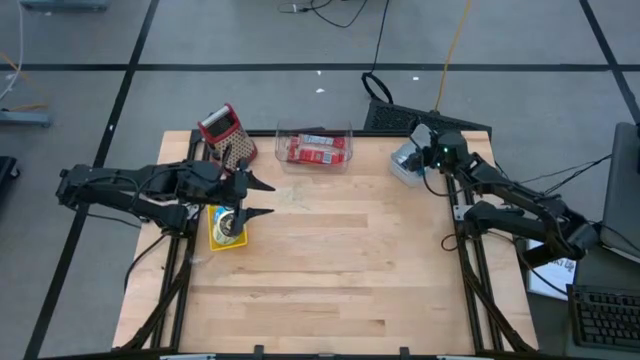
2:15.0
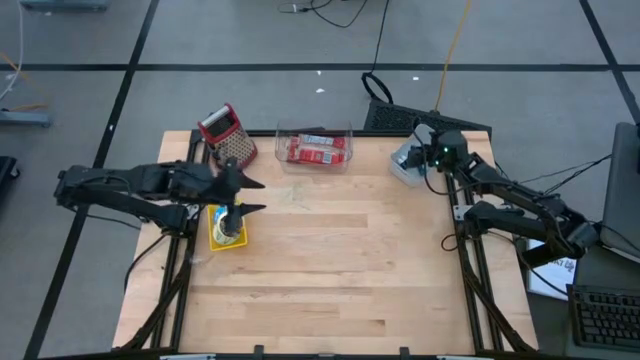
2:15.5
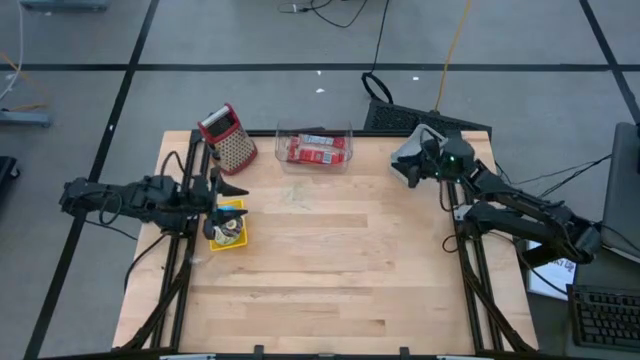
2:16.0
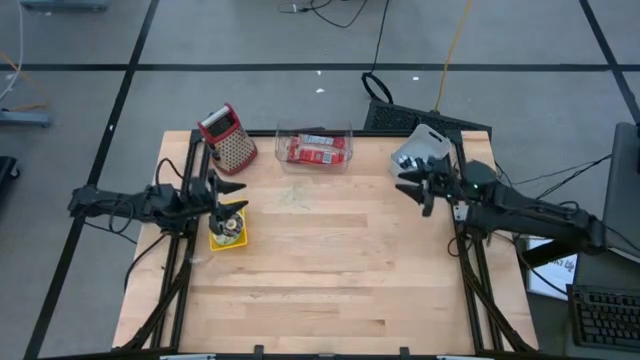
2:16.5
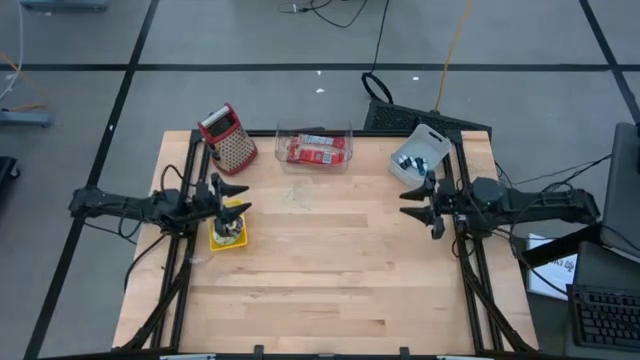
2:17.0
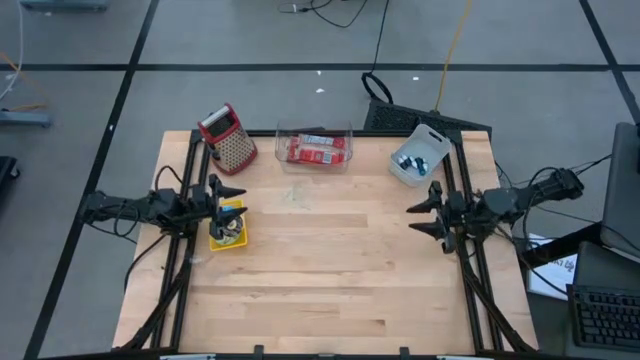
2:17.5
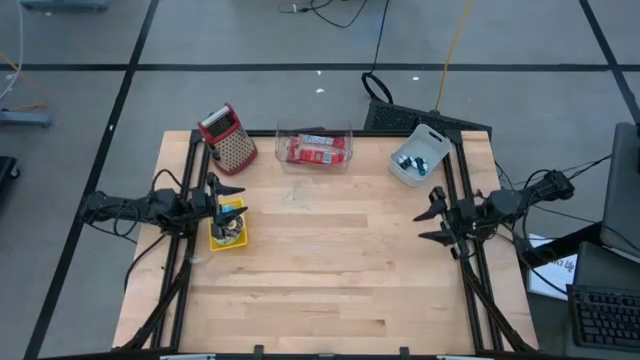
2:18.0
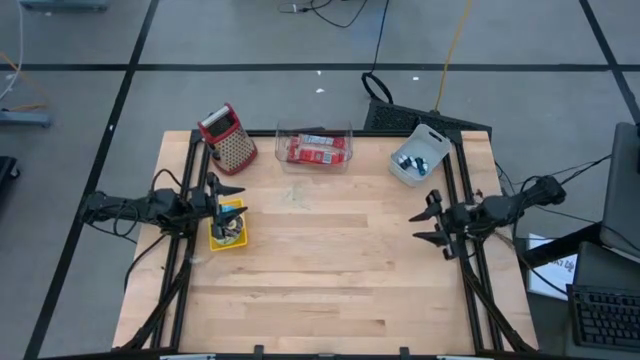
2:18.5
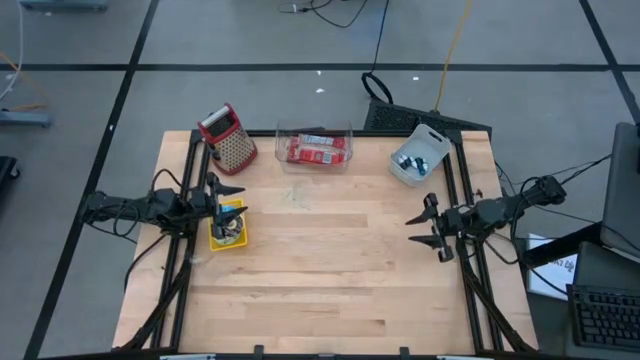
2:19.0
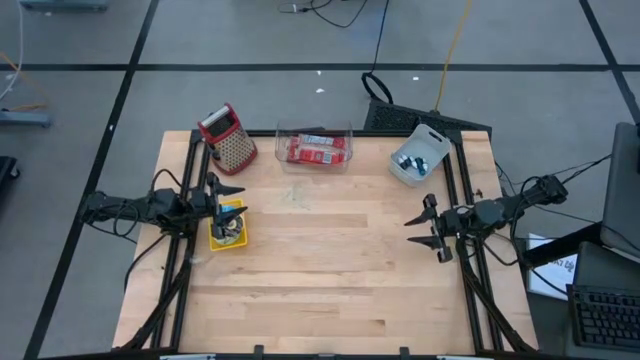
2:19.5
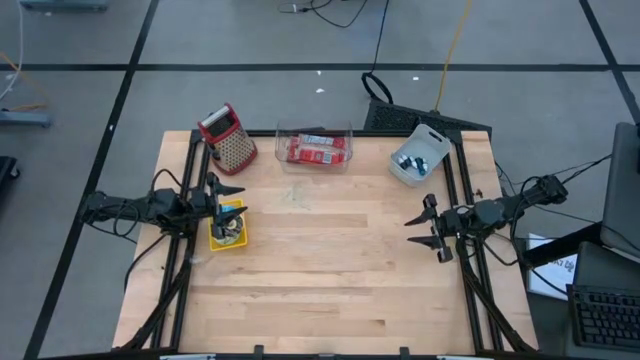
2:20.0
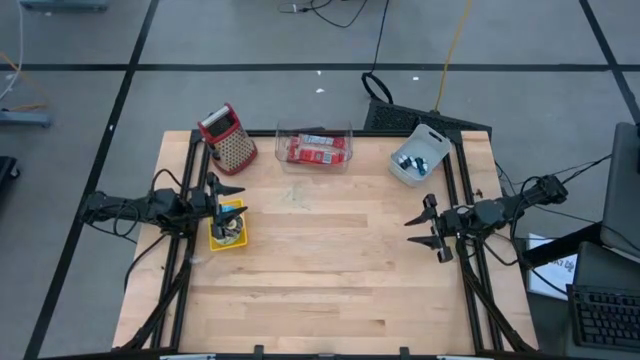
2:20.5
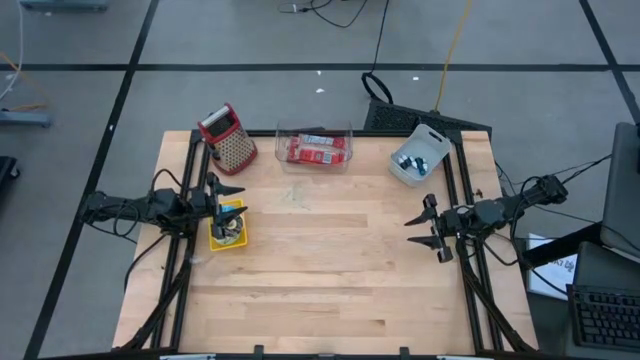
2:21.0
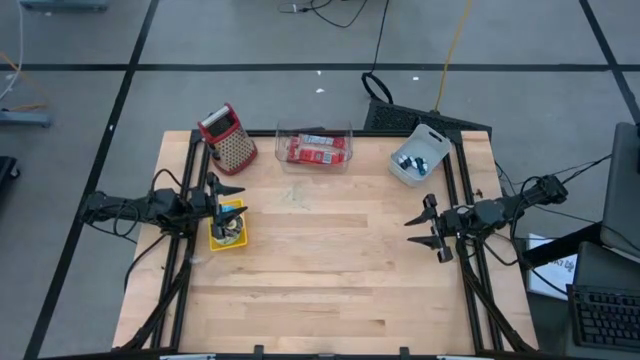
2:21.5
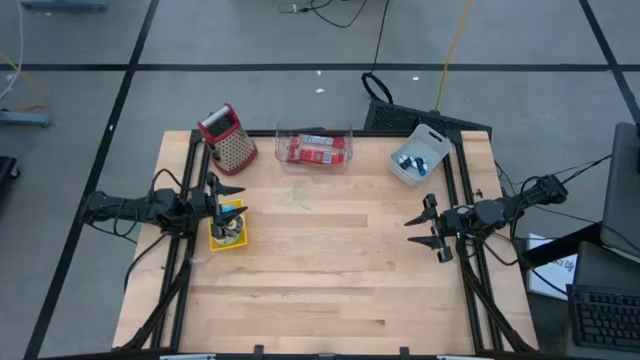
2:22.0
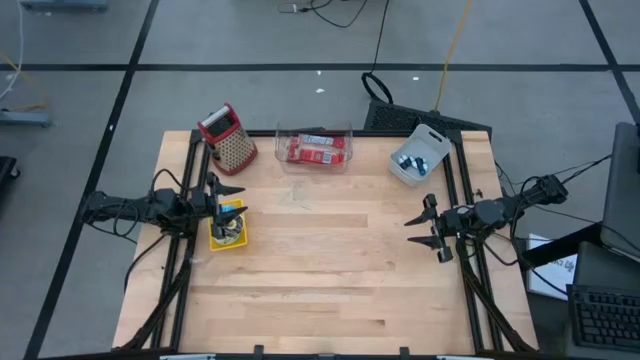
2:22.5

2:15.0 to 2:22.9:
Return to Home Position

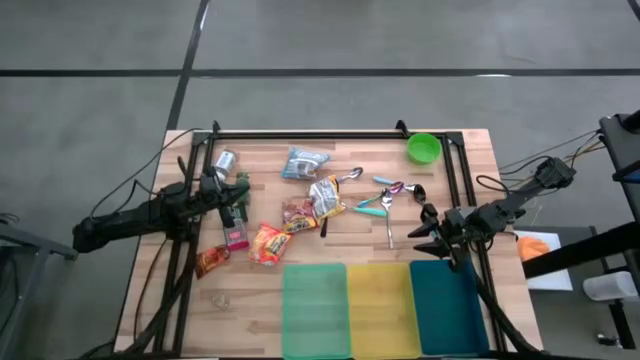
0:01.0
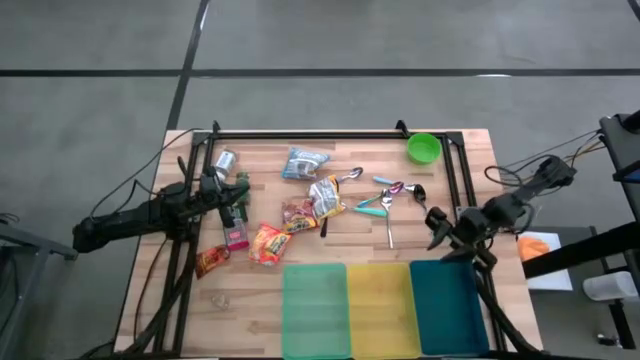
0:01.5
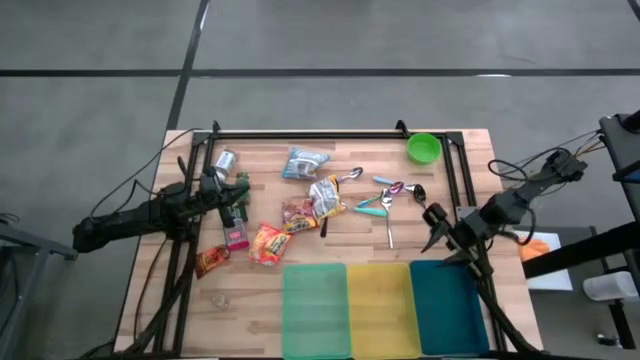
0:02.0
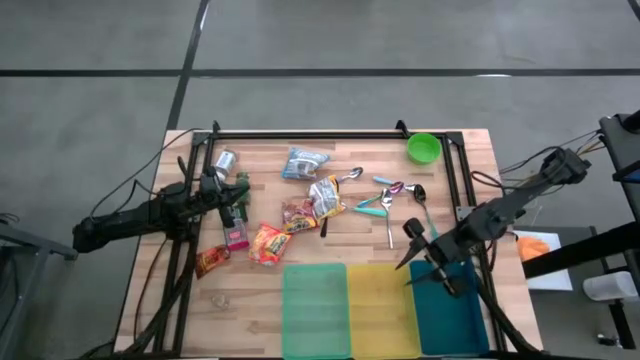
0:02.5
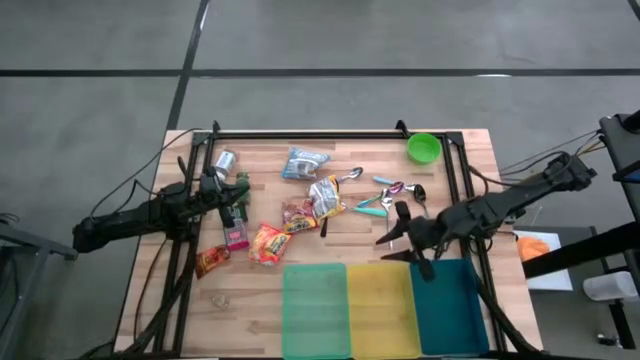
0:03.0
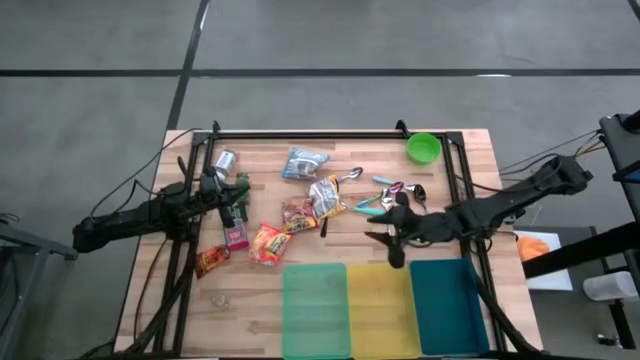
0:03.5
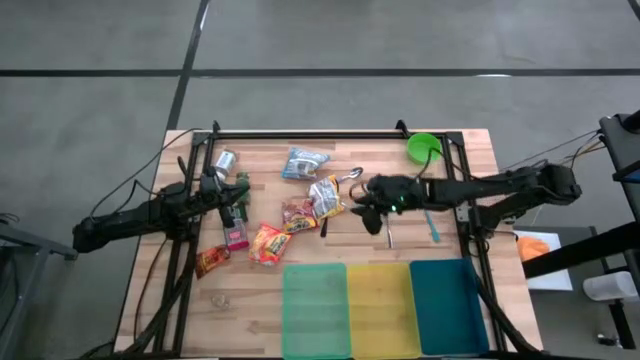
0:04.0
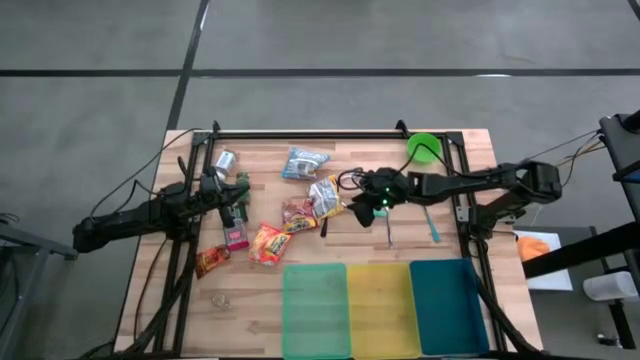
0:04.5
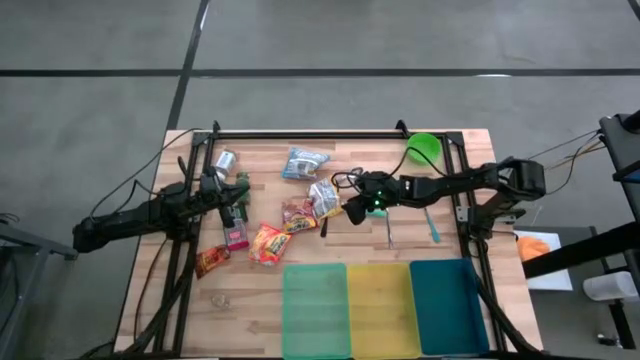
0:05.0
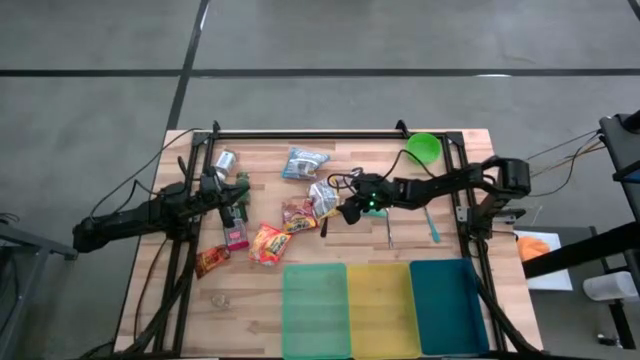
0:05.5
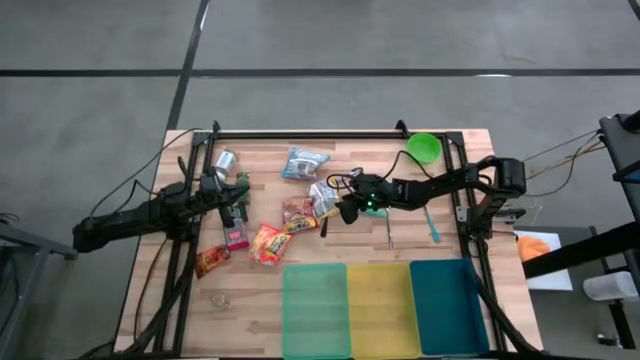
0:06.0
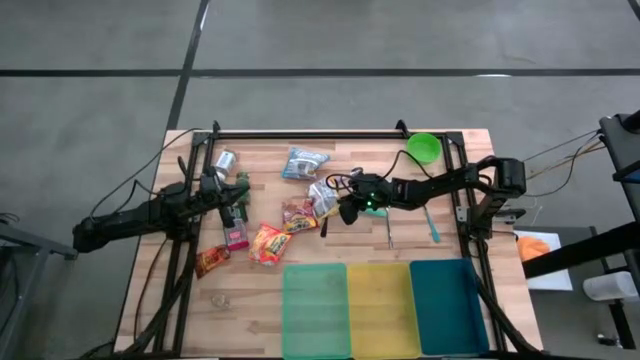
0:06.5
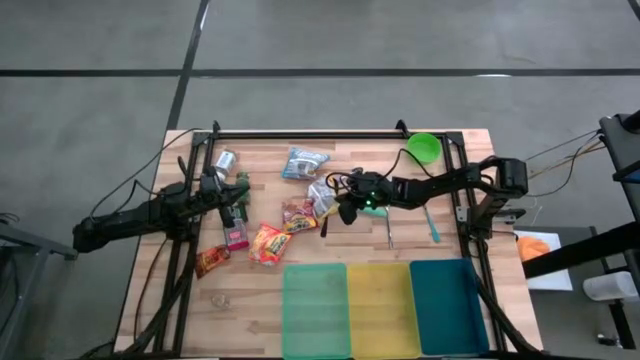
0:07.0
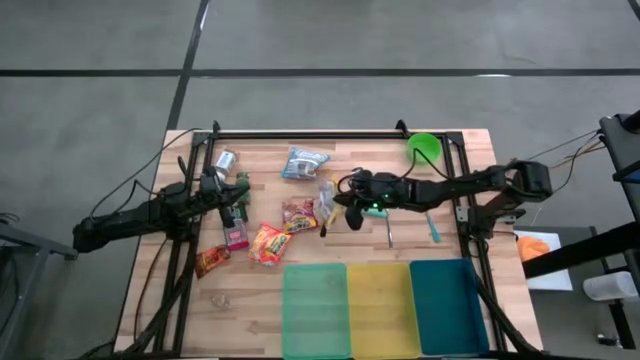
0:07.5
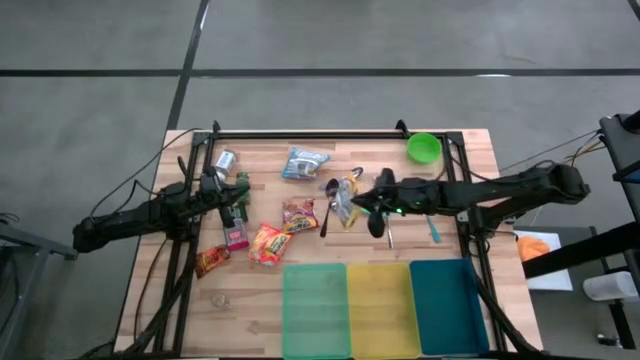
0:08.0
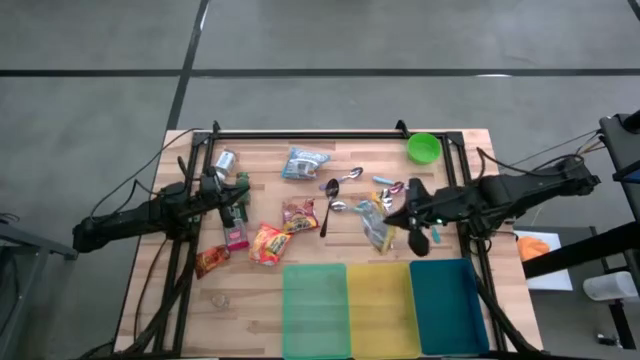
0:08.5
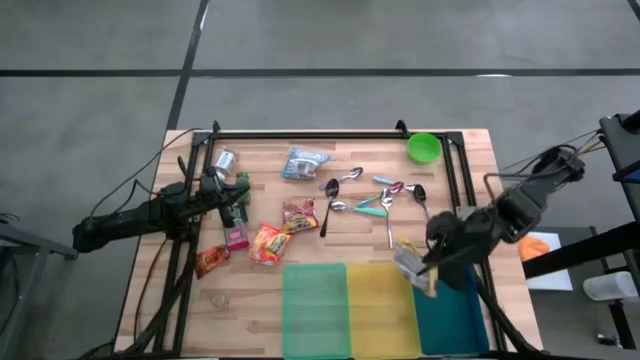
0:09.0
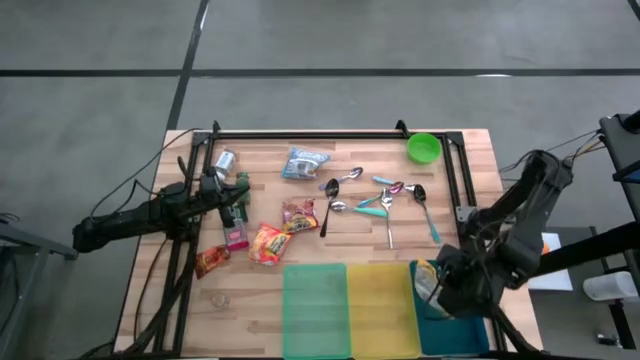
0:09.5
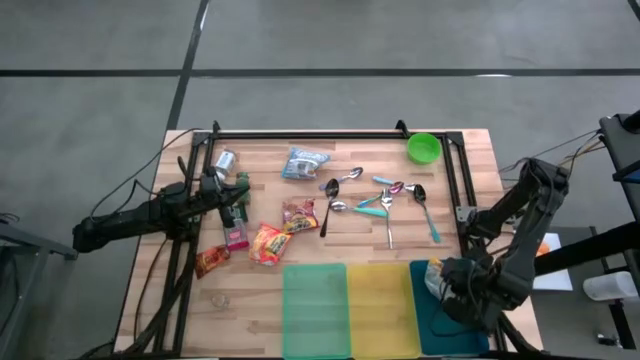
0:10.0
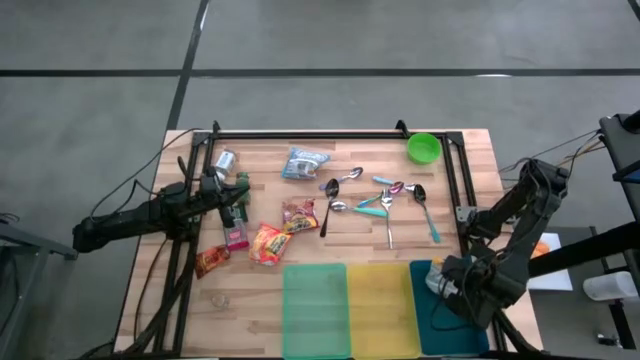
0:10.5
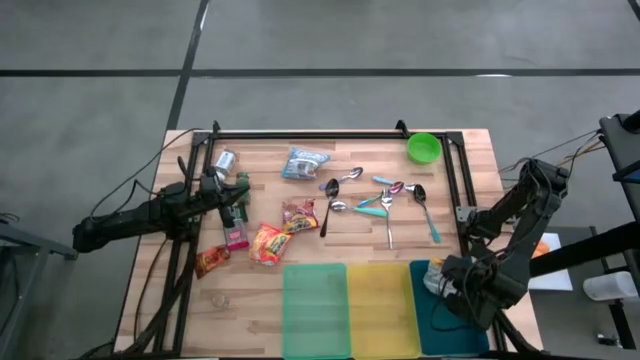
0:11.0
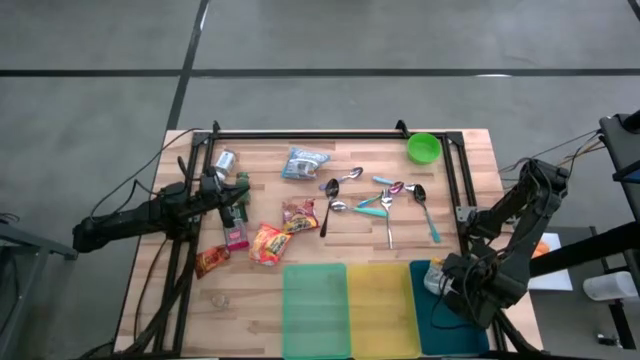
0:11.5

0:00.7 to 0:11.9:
Put the yellow noodle pack into the blue bin
